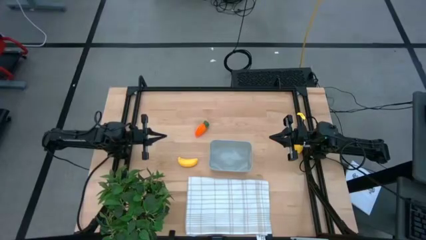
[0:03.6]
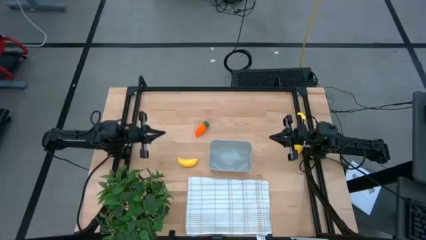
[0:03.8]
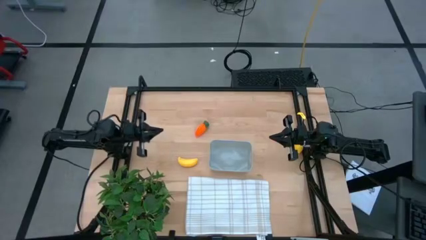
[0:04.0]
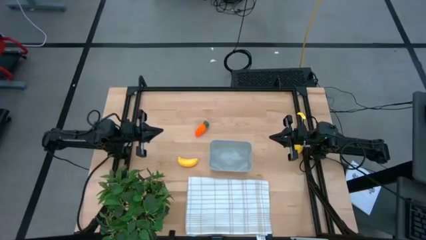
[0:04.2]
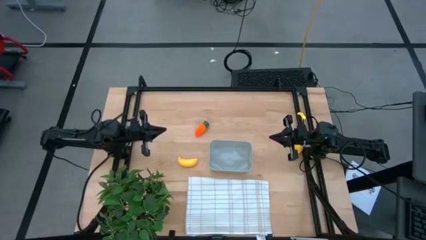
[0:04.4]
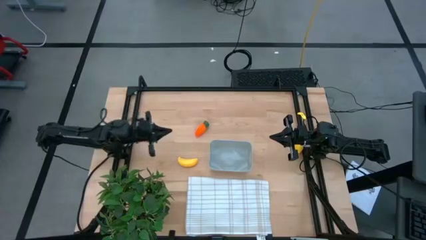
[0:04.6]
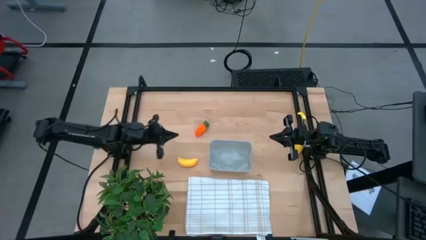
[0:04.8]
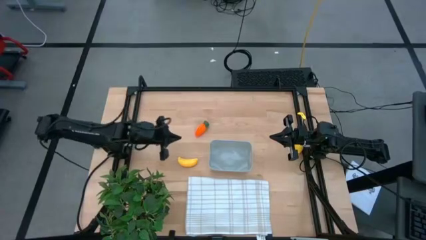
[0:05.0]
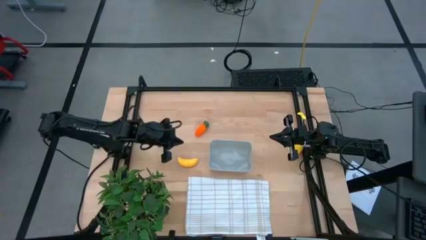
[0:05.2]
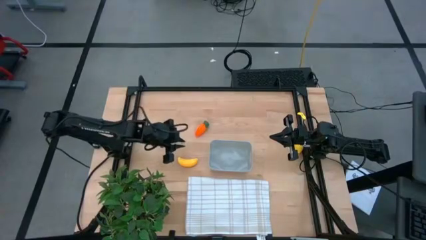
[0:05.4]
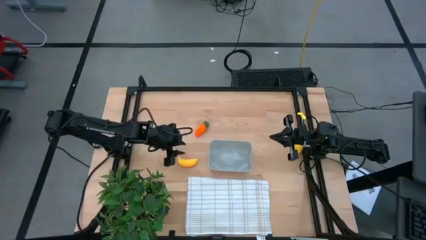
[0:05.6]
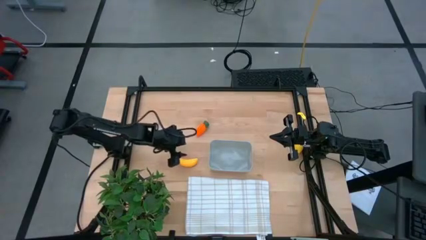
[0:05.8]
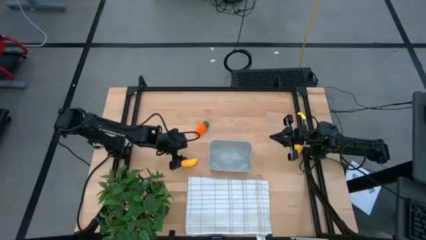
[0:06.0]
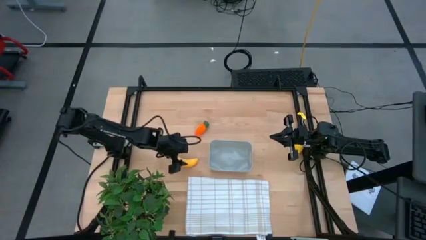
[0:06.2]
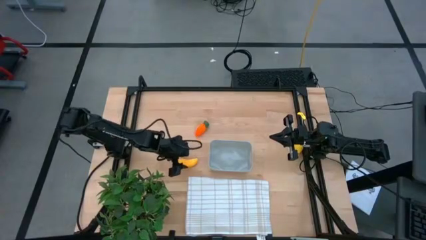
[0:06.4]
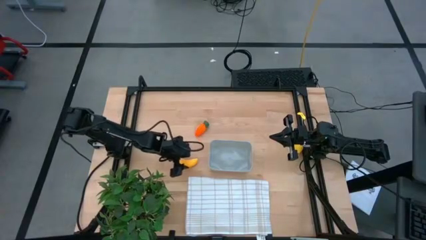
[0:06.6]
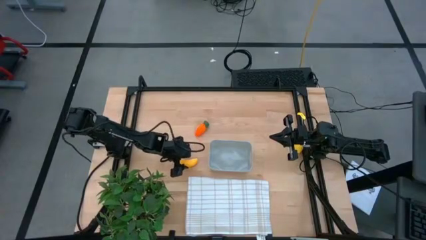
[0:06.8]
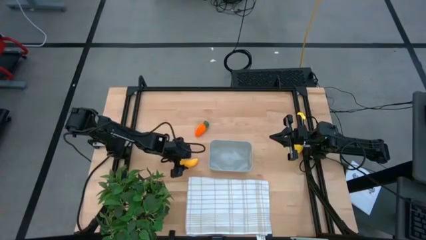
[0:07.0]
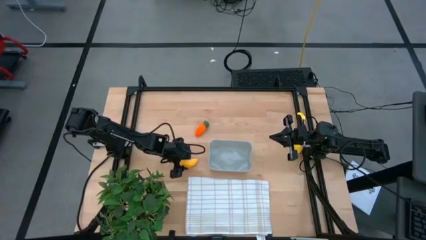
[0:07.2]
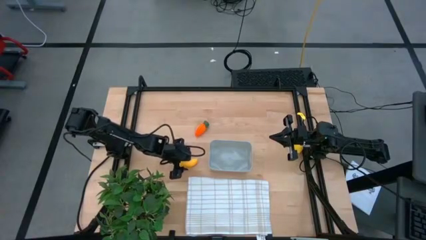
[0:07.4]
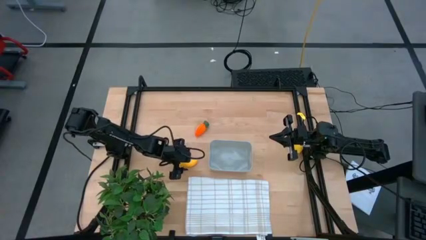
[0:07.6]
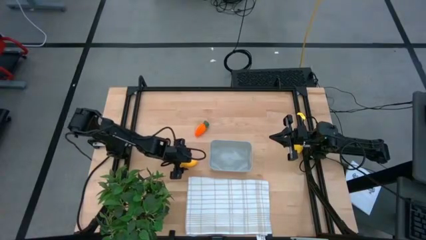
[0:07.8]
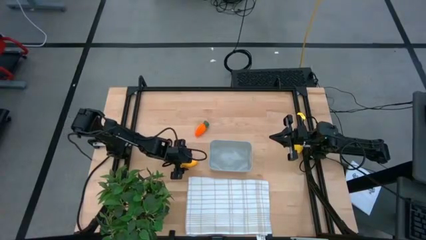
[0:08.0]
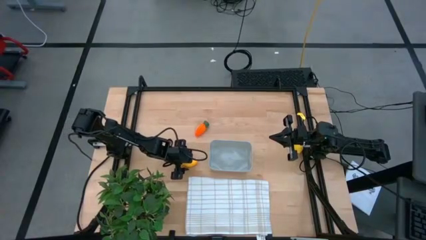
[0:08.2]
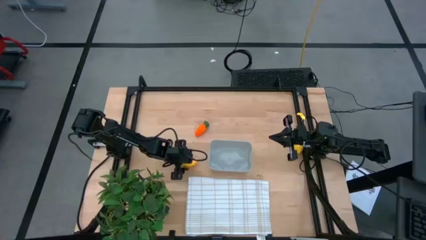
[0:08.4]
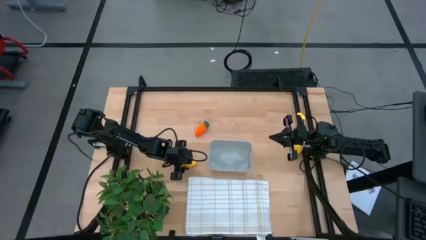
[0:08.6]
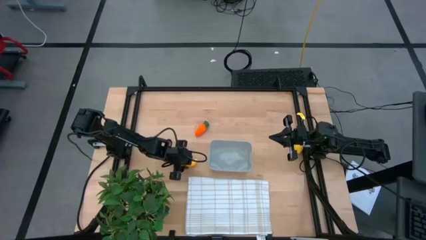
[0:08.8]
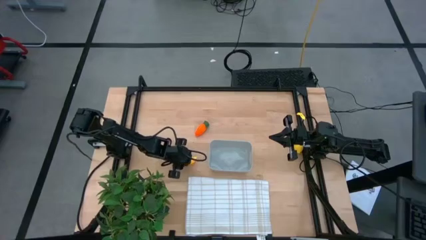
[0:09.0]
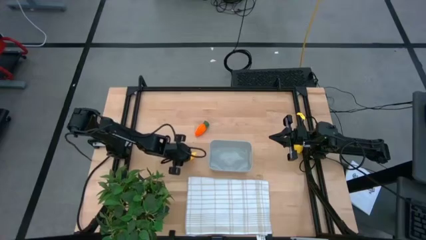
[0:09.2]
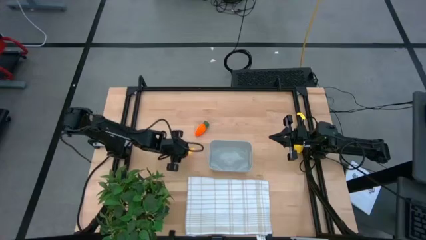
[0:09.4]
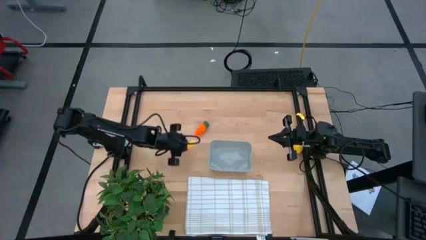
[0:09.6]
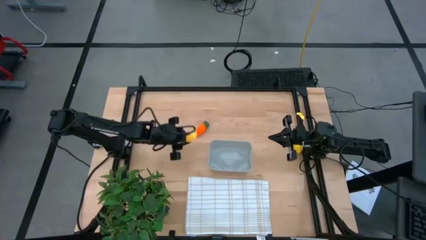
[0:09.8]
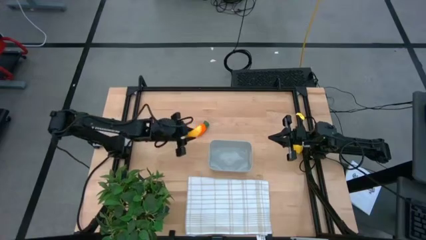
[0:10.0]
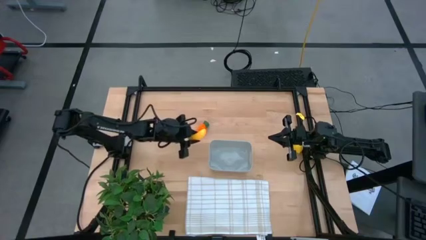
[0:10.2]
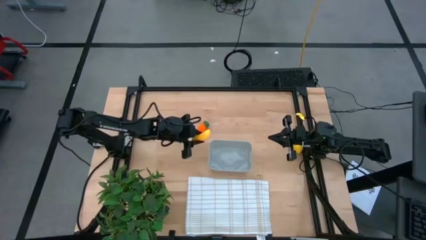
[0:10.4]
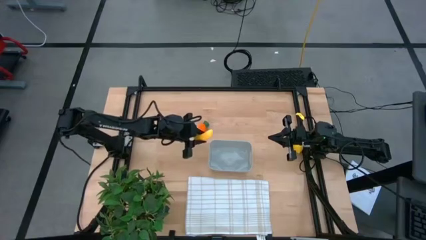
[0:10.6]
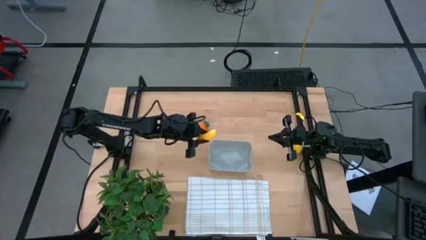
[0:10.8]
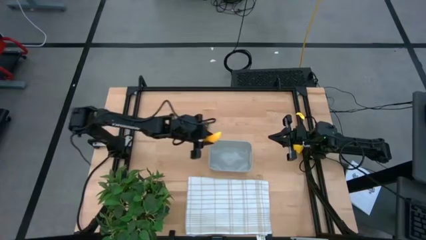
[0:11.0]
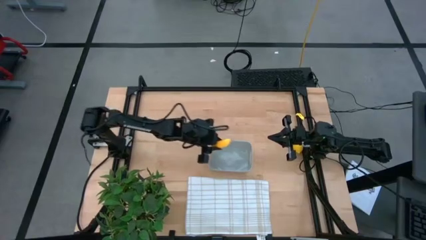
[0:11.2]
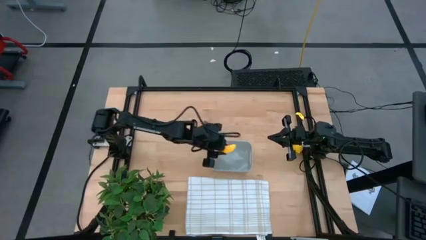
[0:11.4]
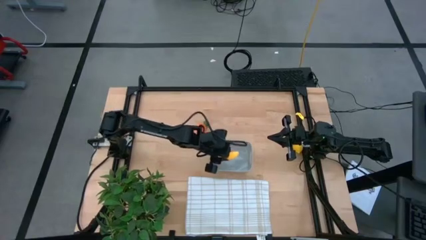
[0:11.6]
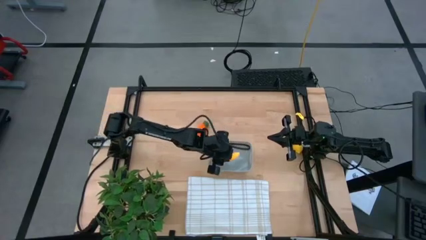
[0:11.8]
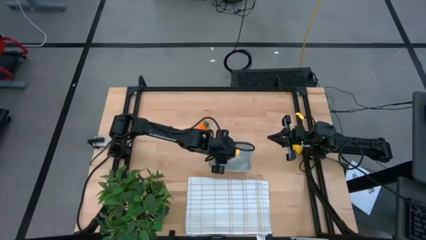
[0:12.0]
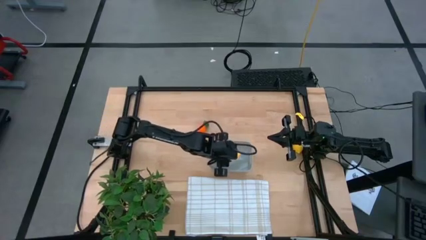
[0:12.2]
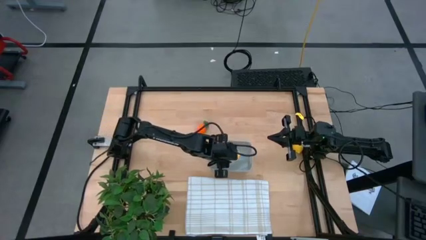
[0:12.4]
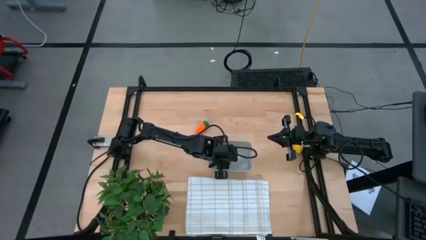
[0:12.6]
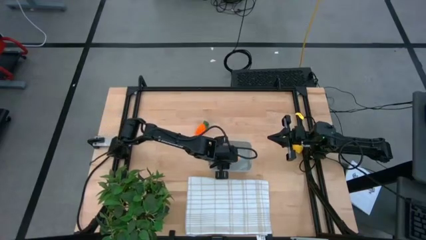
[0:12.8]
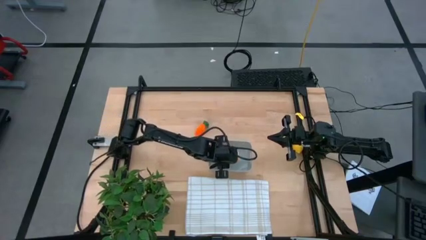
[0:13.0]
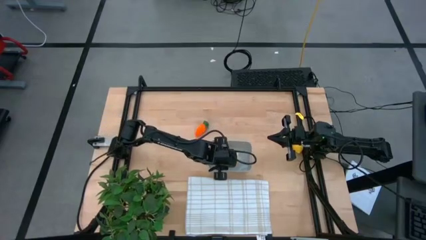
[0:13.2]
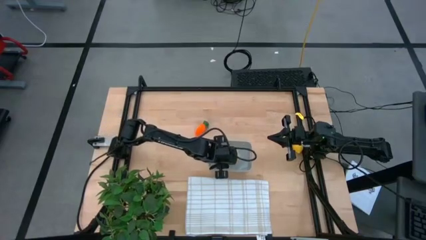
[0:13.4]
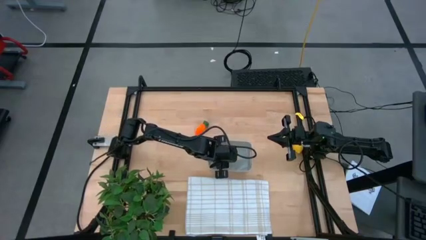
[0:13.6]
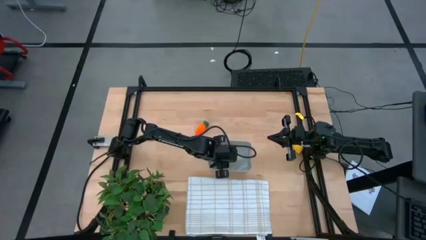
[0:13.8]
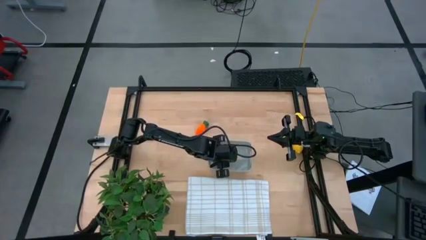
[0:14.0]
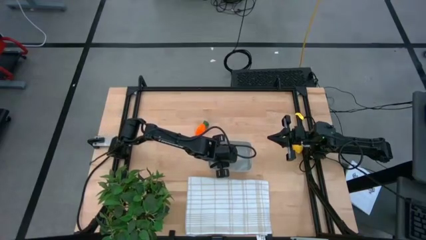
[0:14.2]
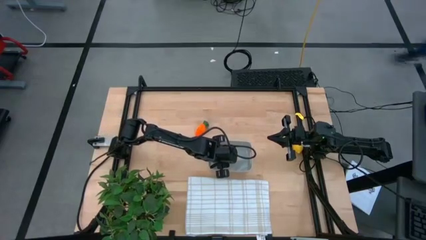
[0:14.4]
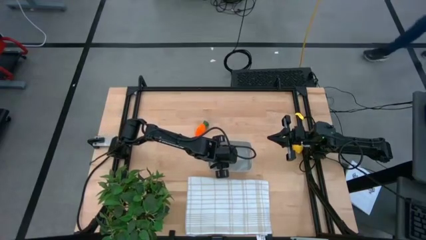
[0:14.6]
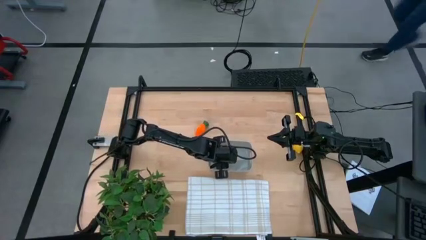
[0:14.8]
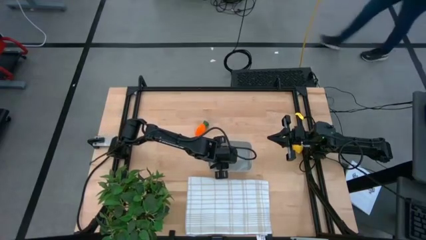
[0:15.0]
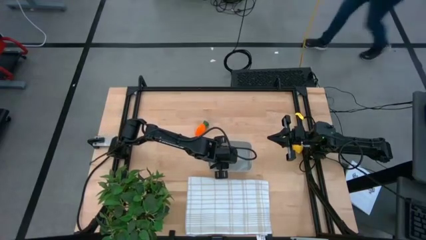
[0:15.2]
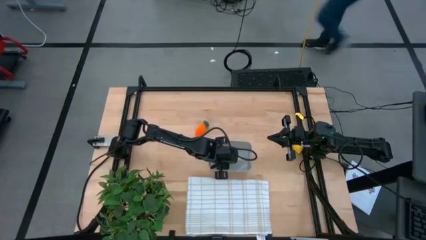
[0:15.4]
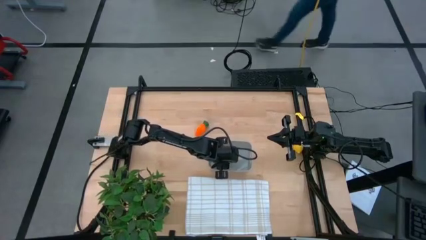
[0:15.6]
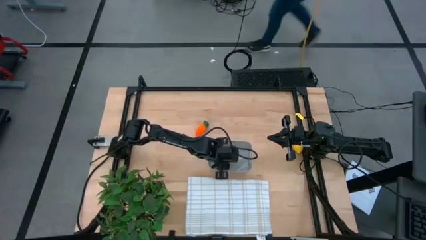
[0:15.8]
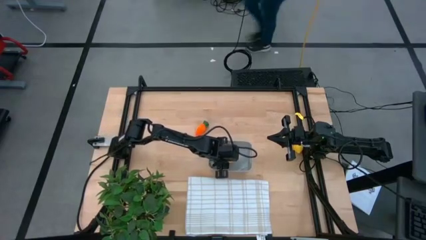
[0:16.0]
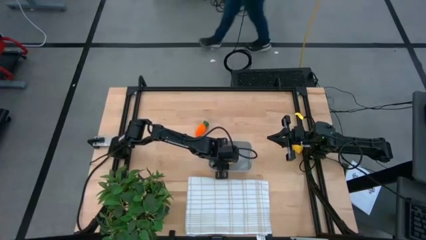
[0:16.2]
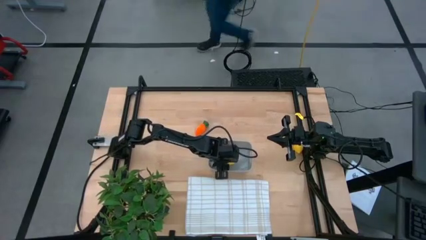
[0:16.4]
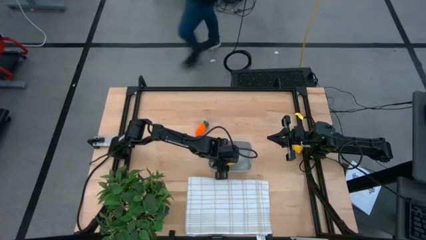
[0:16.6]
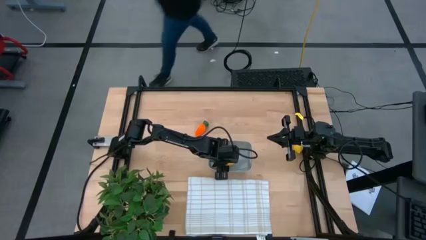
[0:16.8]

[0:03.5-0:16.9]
Task: Pick and placing Produce into tupperware
Put the banana into the gray bin
